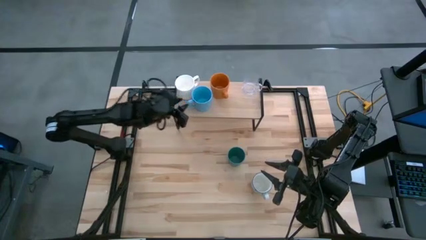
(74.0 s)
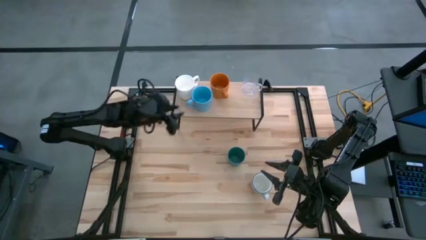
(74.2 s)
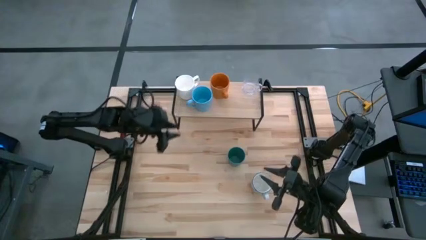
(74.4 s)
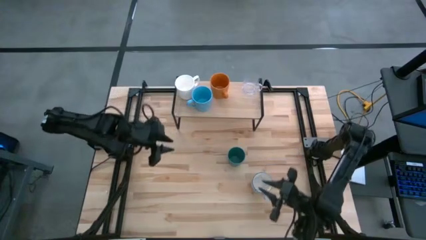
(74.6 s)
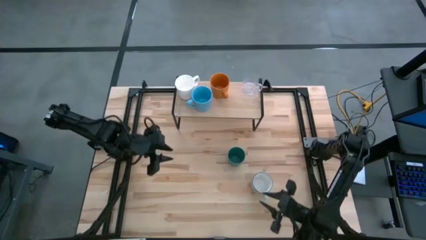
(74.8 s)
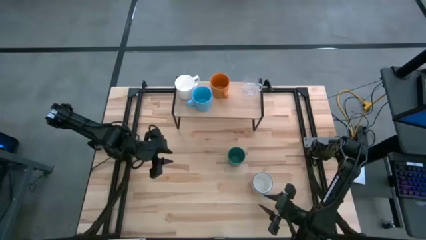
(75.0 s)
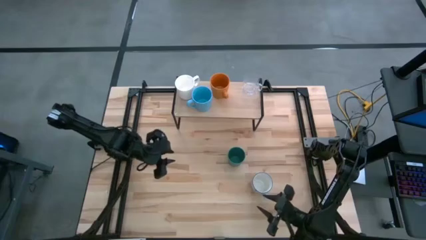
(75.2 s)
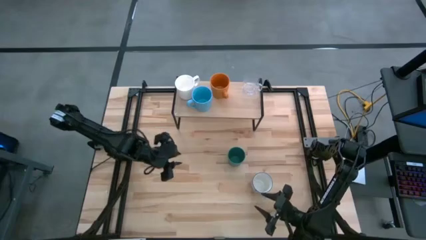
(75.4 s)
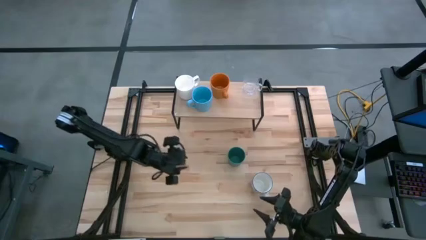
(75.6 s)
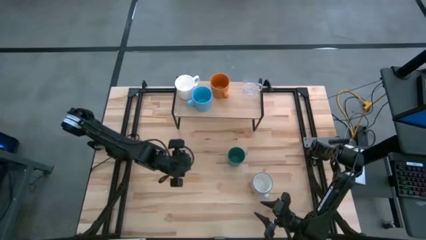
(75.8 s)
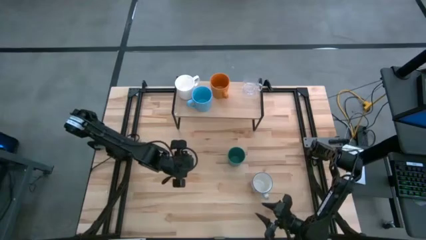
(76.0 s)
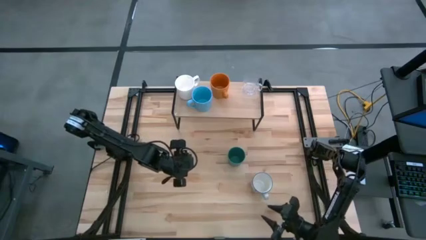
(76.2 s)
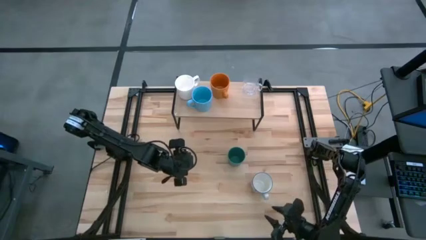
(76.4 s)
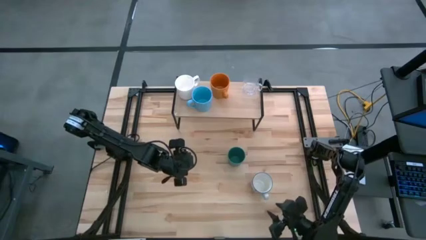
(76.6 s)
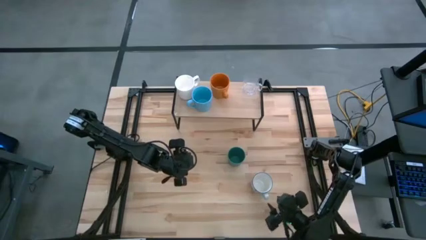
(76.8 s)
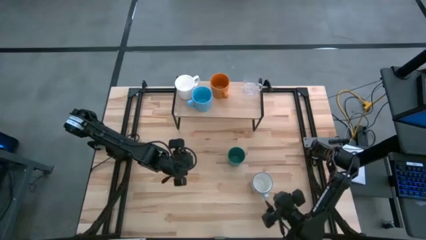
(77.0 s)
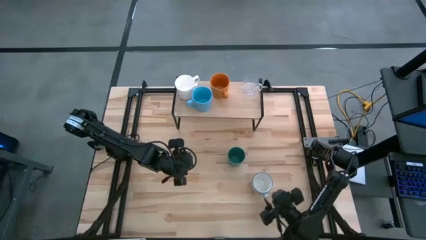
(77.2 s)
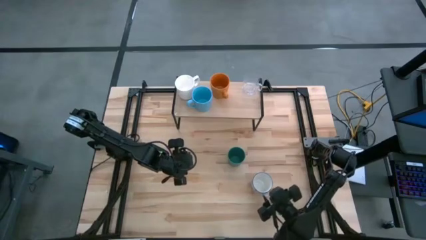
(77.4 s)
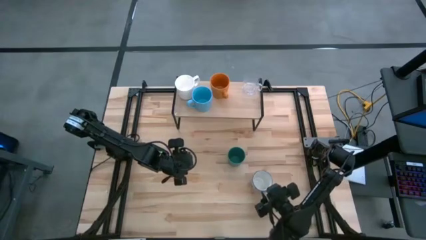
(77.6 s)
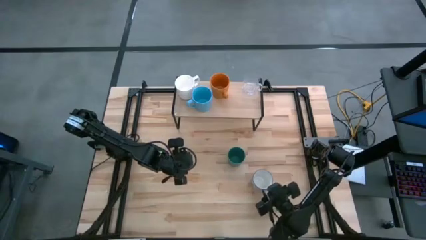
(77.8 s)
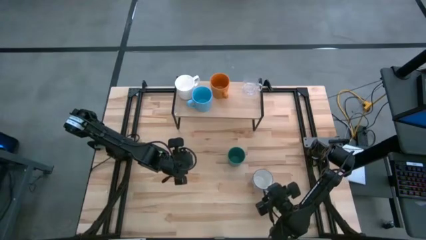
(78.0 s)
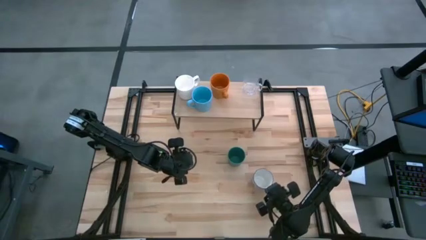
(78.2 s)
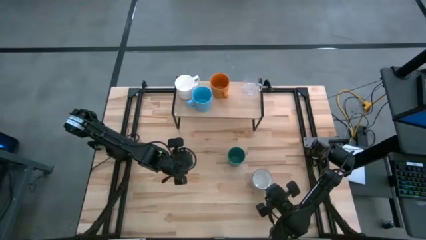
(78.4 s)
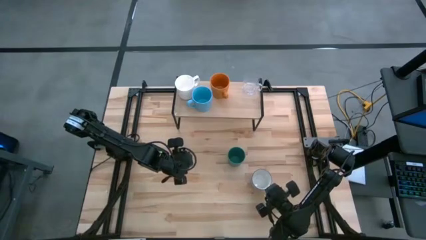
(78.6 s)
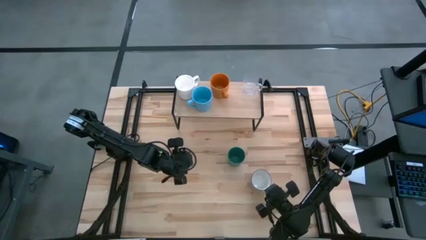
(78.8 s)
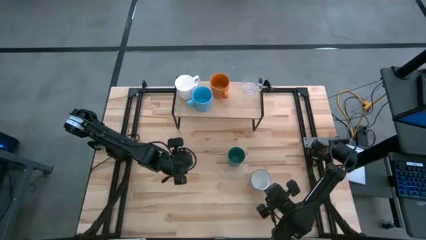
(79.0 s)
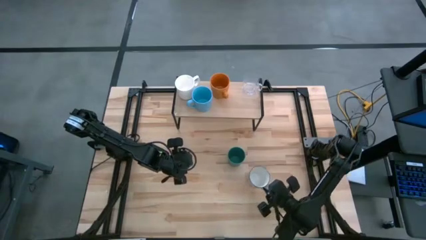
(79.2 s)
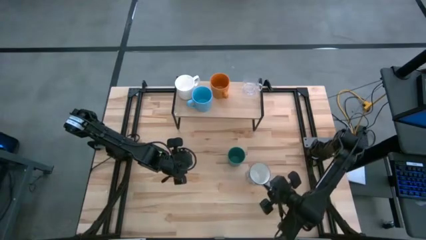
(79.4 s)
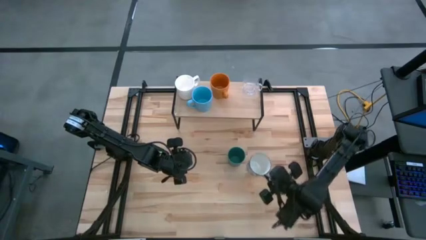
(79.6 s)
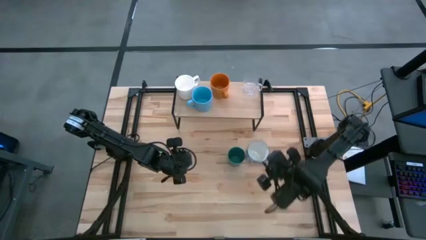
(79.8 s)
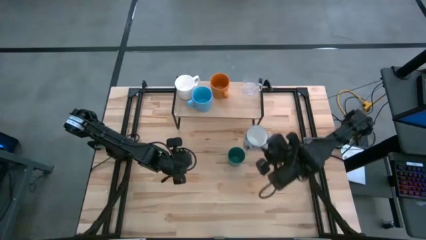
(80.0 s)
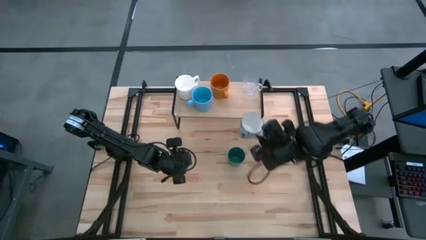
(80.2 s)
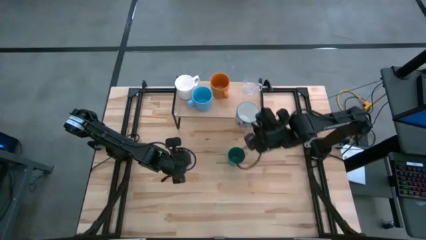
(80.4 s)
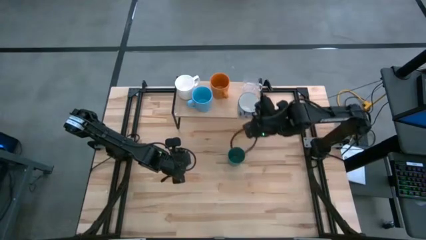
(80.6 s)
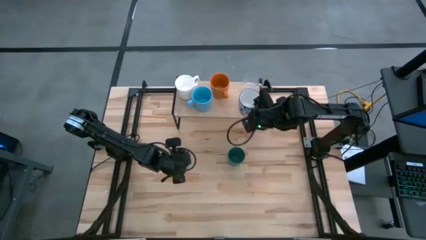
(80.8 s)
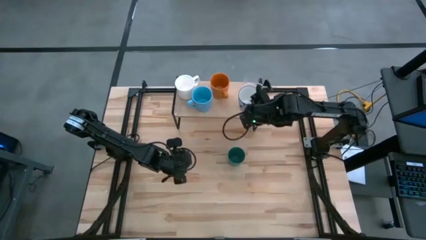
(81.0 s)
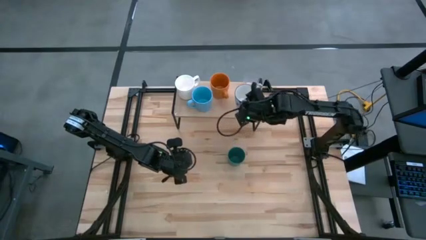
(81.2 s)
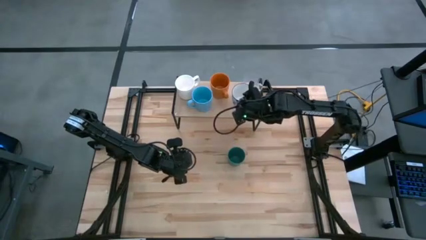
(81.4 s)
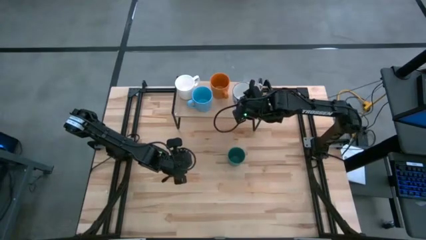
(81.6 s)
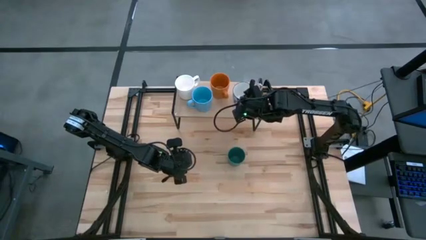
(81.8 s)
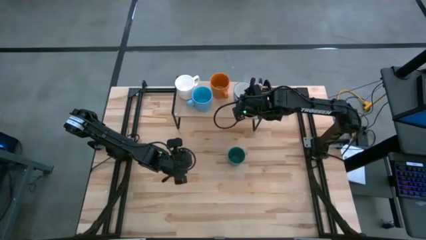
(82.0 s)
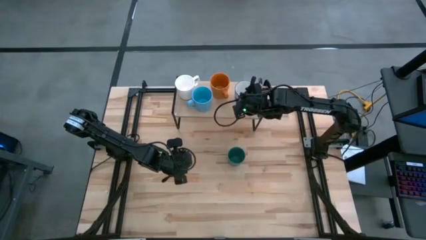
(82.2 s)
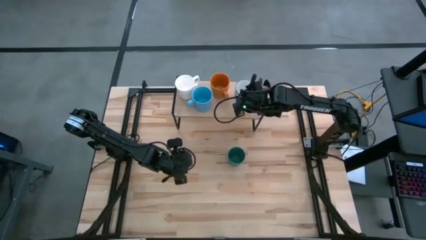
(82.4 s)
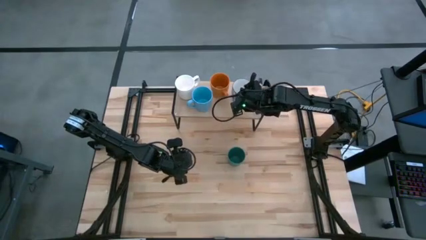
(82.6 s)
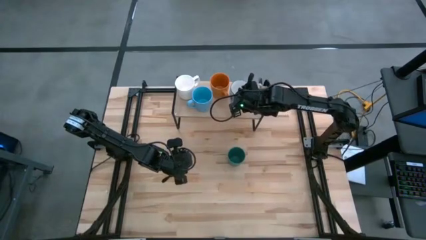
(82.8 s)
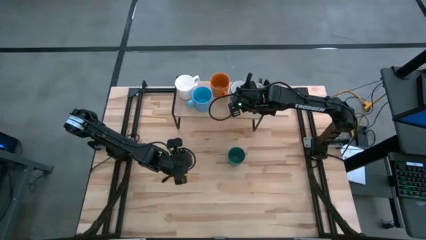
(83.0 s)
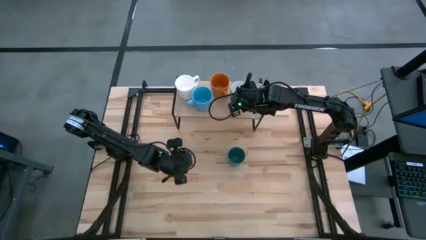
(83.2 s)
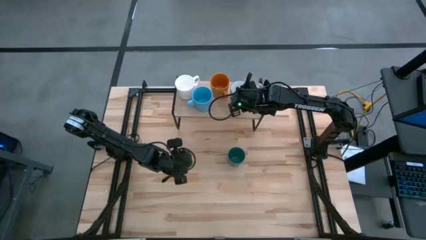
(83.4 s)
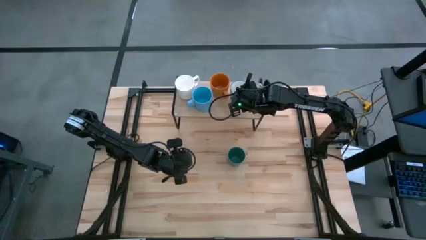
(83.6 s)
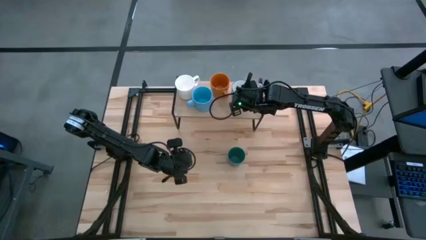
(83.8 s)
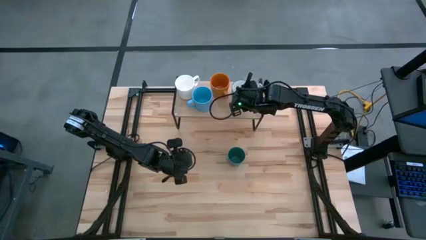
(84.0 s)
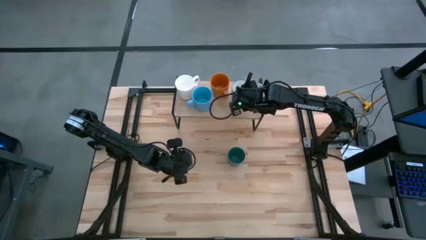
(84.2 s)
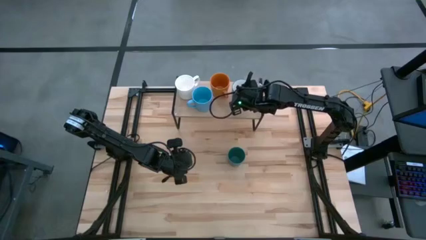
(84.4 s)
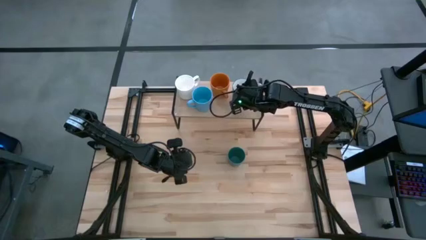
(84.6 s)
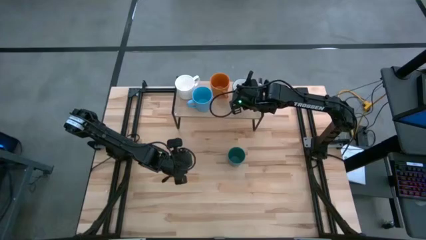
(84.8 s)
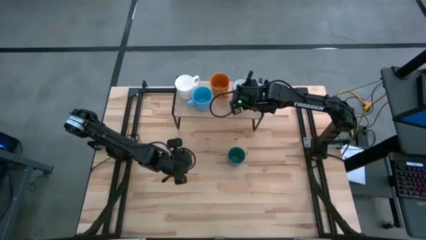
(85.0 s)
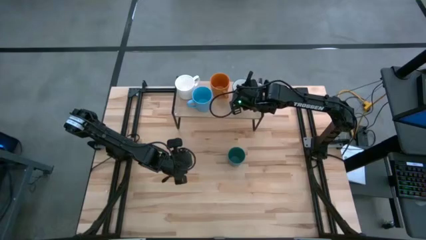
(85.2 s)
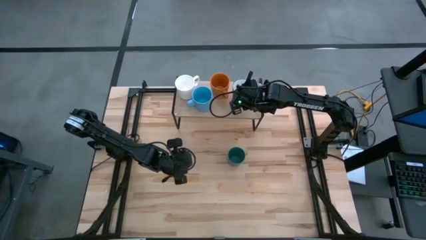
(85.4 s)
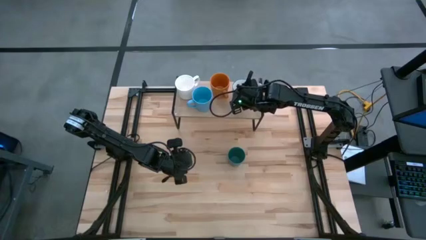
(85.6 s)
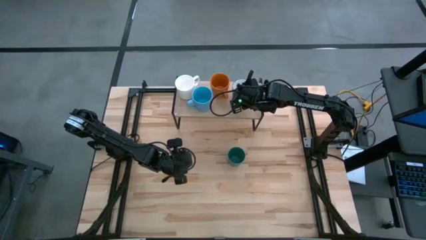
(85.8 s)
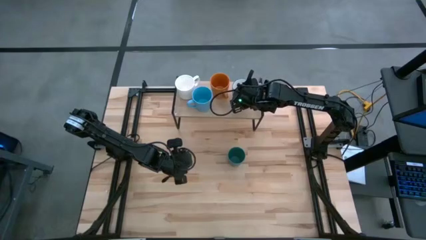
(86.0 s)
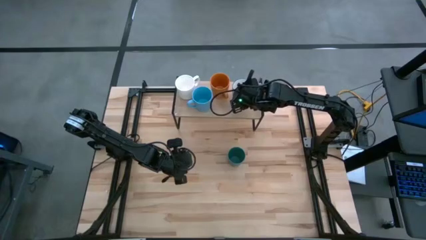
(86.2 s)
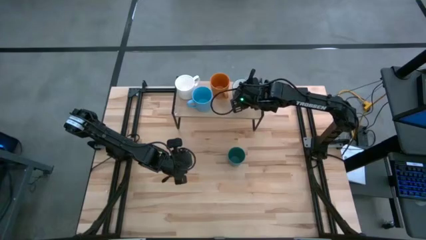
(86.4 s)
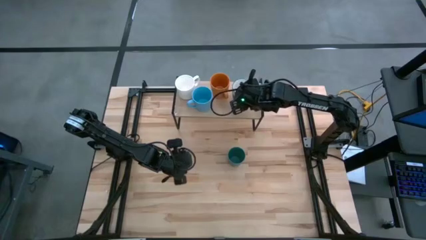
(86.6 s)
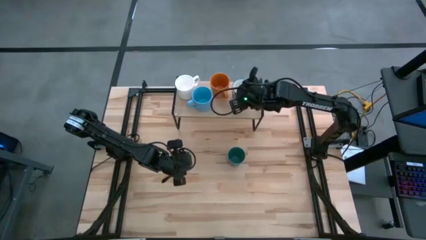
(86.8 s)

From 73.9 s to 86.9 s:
Task: Stack small to large cups/mugs on shelf
Put the blue and white cup on the shelf

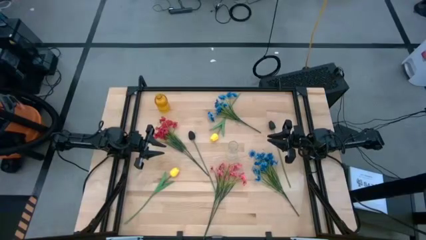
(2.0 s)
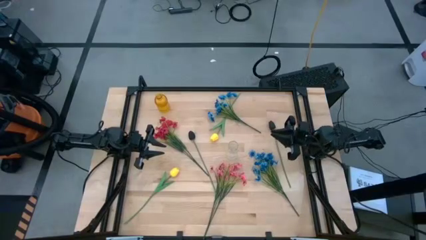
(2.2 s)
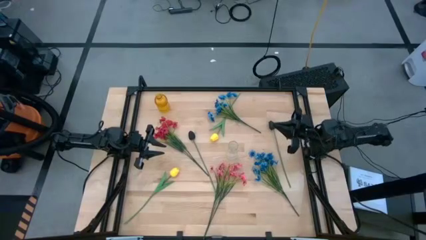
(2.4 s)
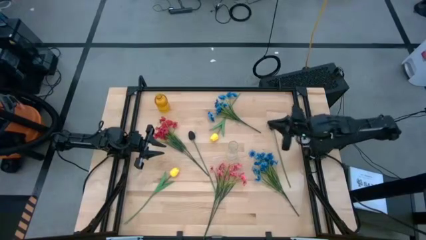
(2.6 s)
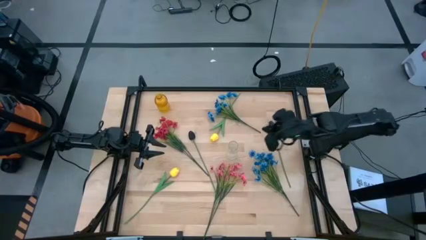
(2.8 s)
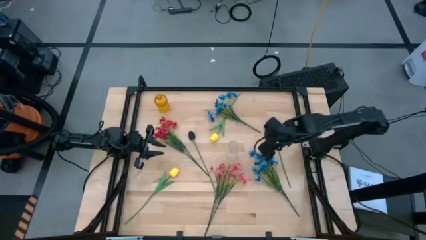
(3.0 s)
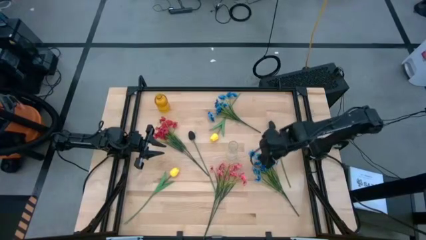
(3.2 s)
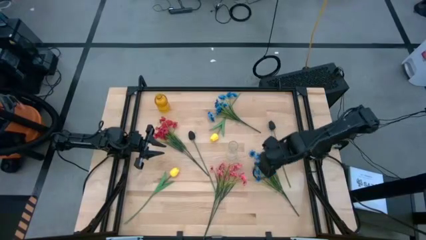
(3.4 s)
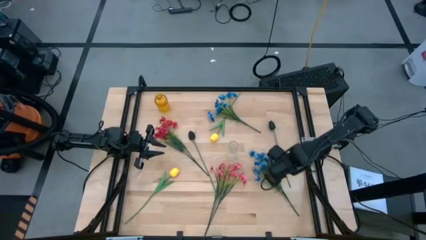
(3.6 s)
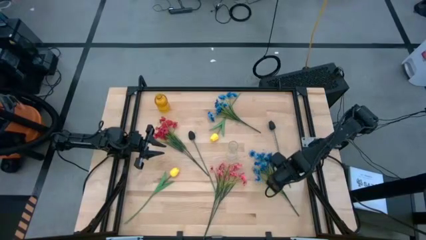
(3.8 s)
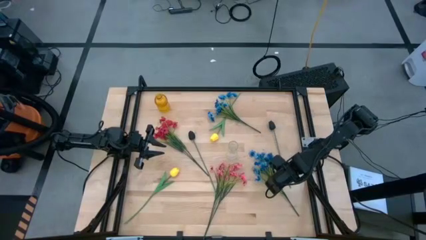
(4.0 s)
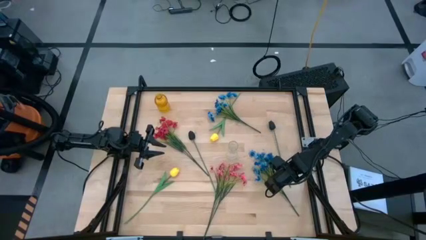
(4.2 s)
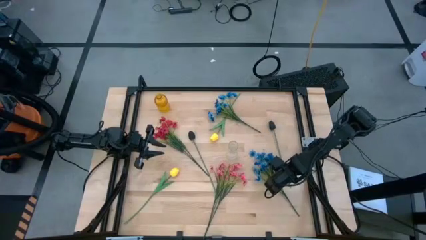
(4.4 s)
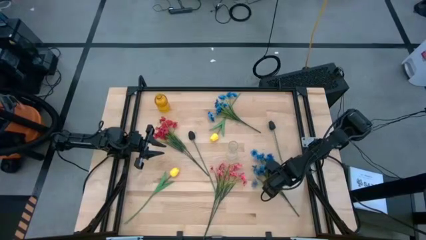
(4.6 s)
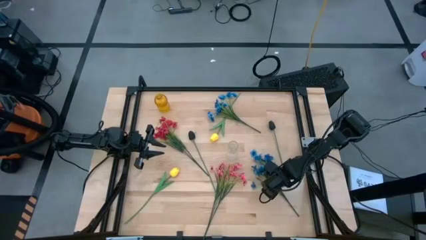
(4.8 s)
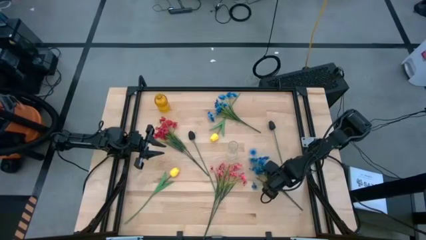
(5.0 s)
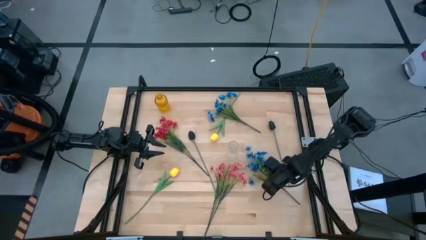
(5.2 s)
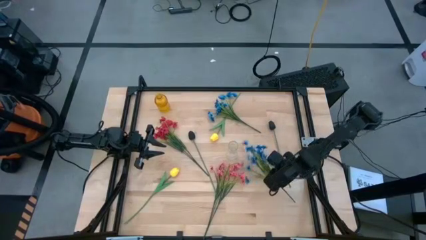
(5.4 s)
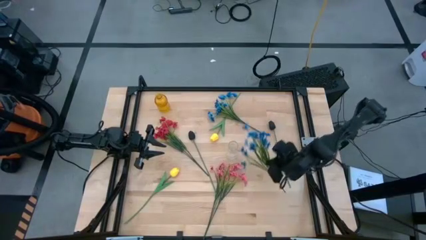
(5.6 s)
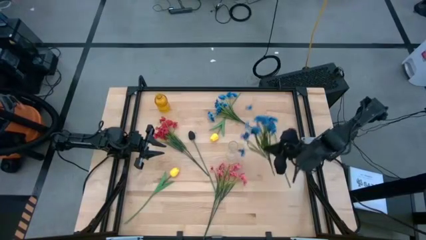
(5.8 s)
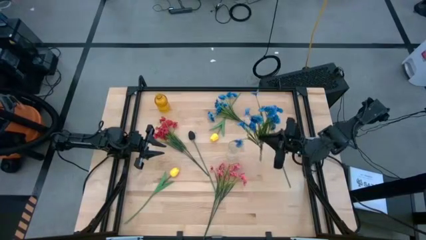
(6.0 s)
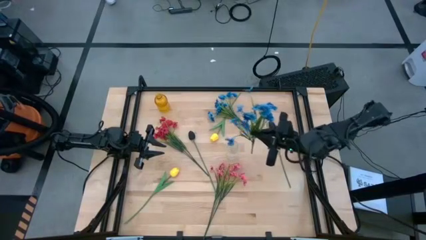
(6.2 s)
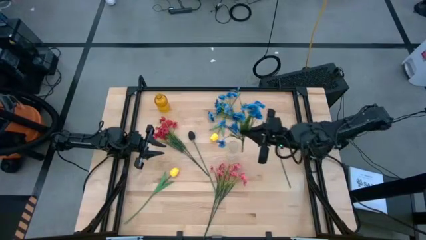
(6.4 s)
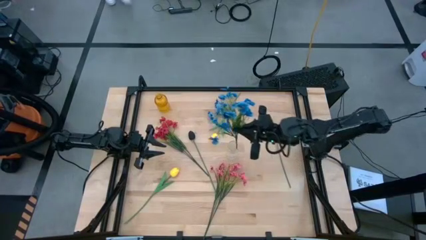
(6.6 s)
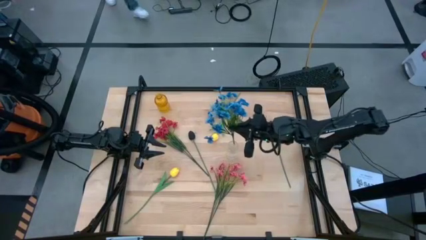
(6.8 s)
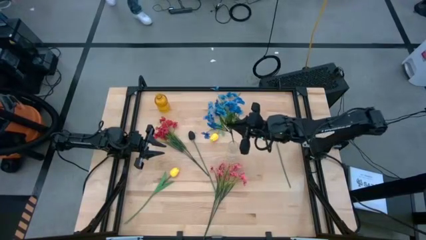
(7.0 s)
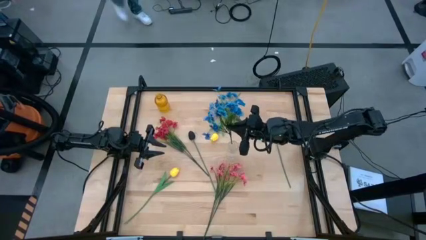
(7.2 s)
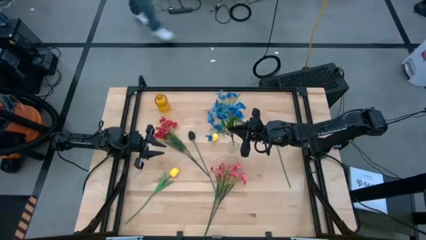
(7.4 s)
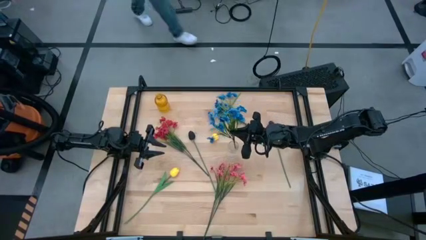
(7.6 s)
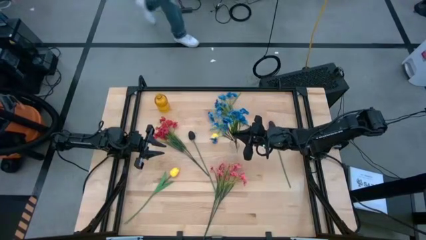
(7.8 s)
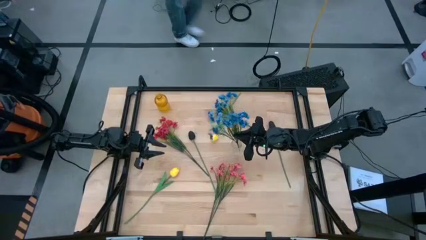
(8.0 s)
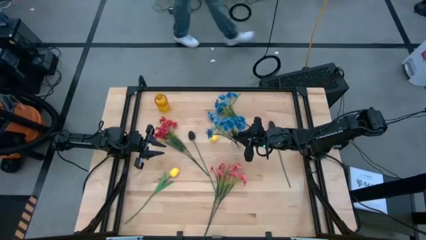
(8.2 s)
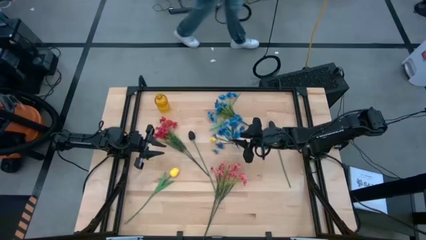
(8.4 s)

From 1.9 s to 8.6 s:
Task: Sort flowers into vase by color
Put the bottom blue flowers into the transparent vase
